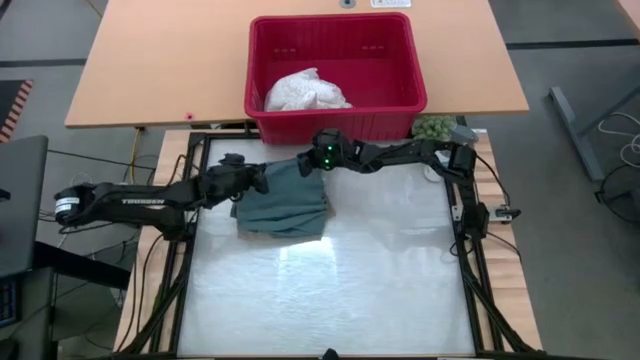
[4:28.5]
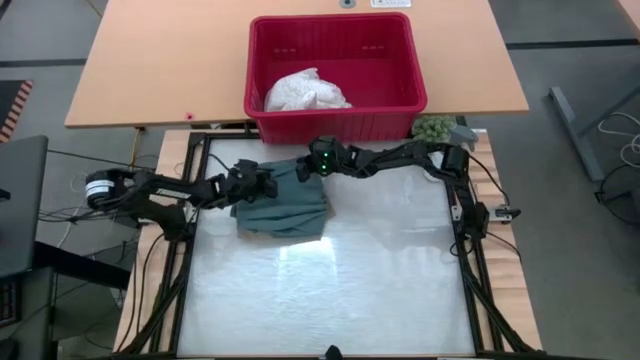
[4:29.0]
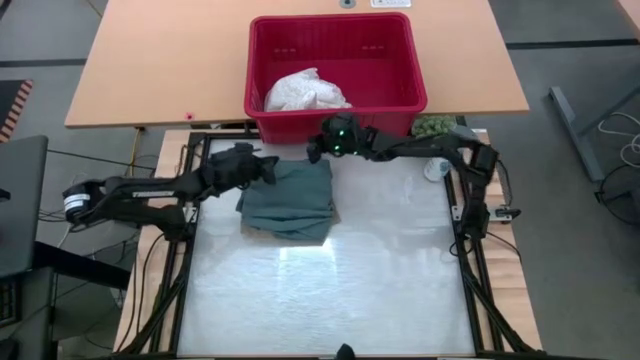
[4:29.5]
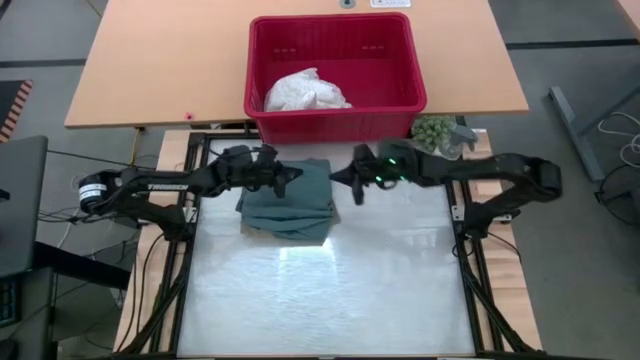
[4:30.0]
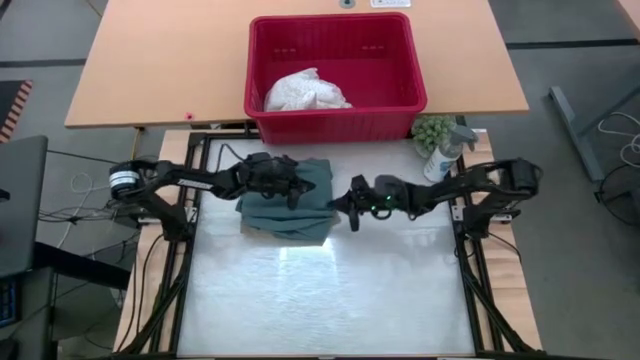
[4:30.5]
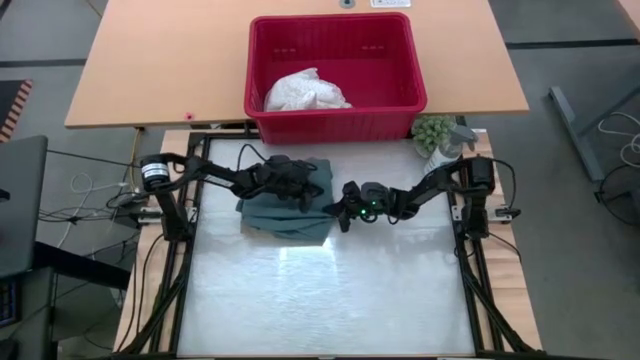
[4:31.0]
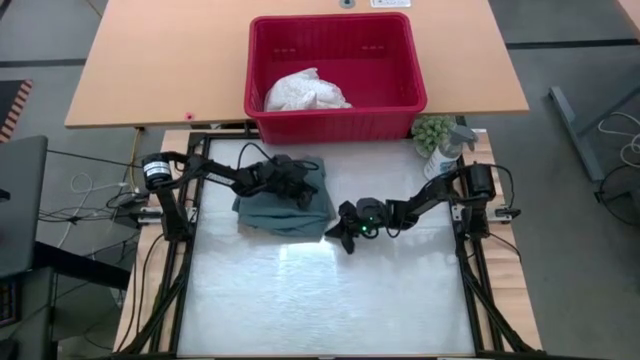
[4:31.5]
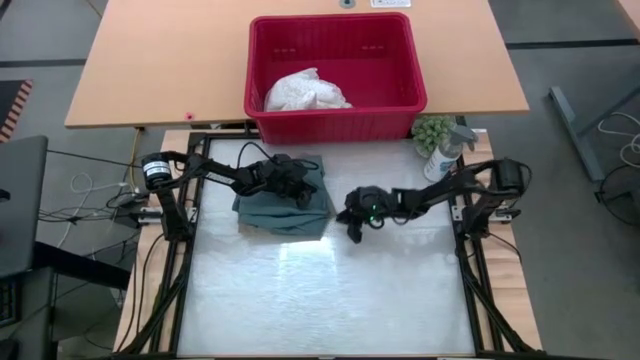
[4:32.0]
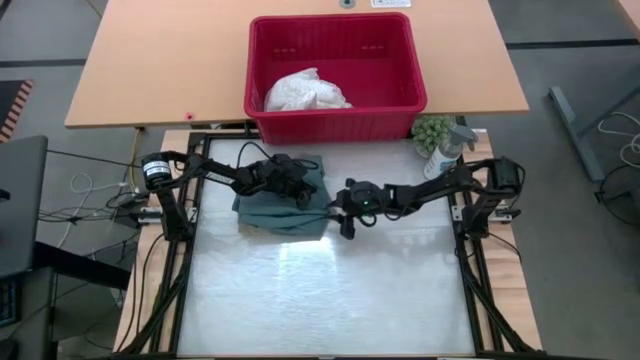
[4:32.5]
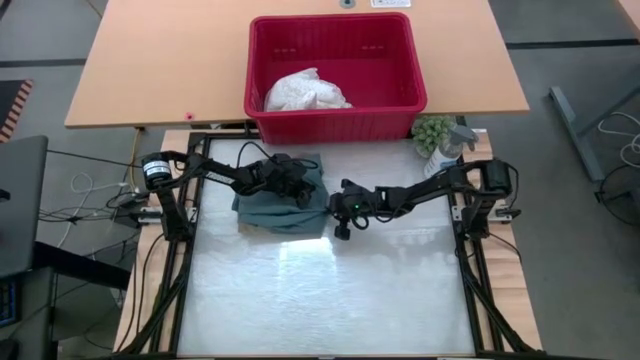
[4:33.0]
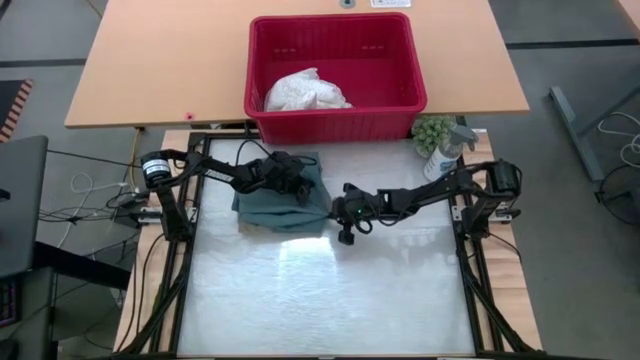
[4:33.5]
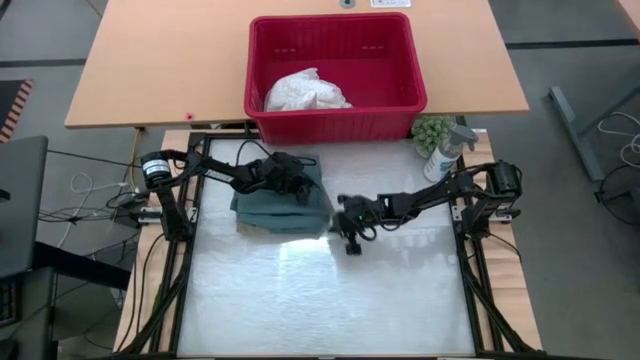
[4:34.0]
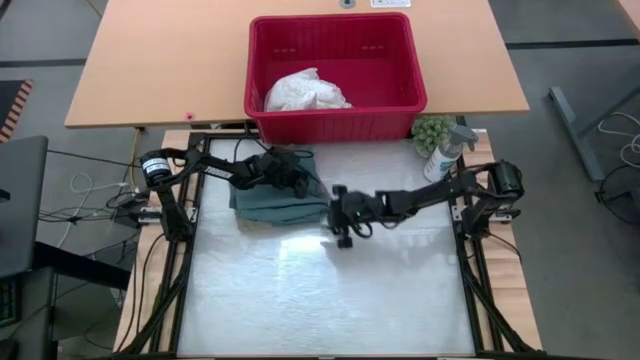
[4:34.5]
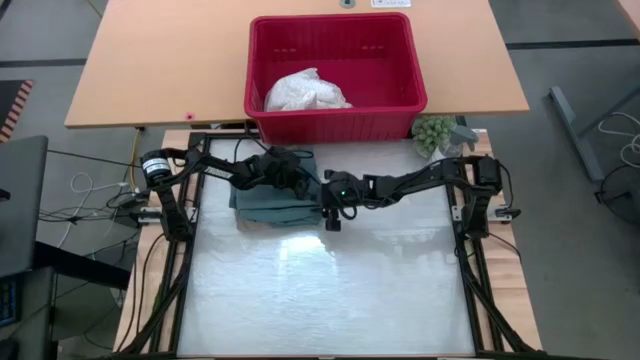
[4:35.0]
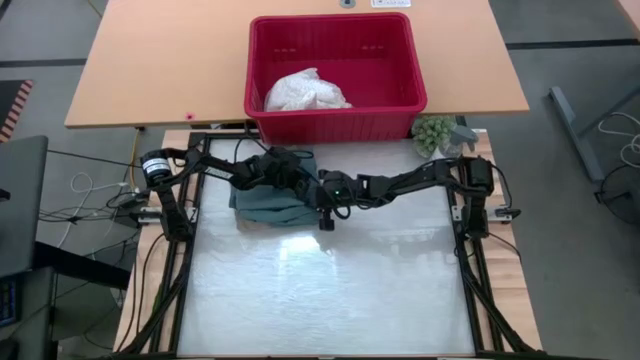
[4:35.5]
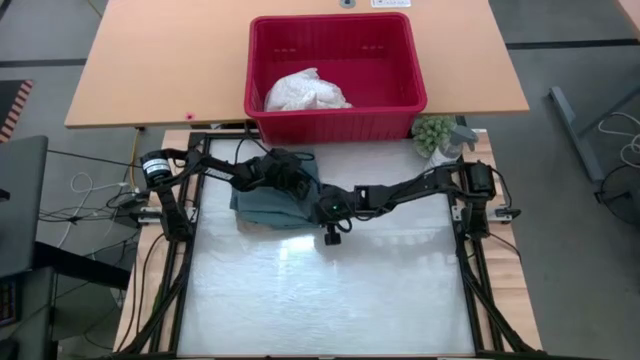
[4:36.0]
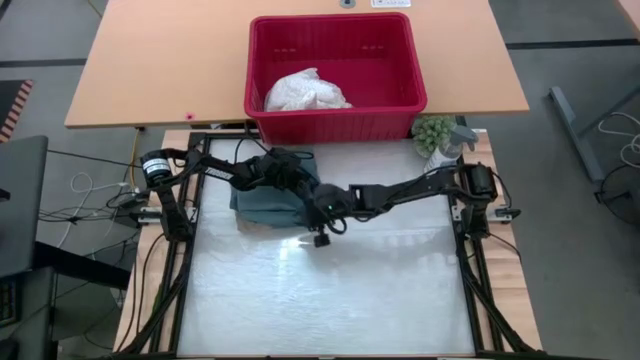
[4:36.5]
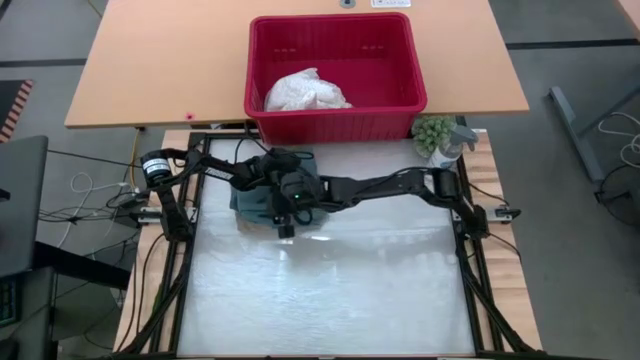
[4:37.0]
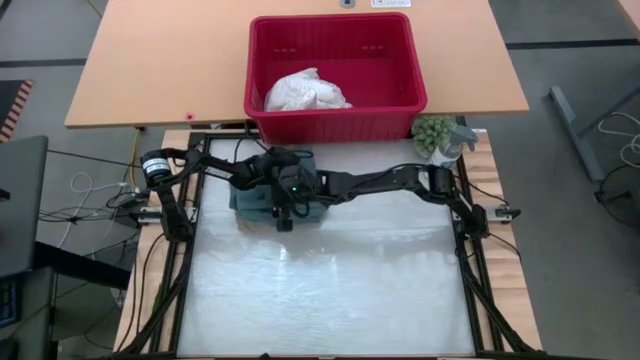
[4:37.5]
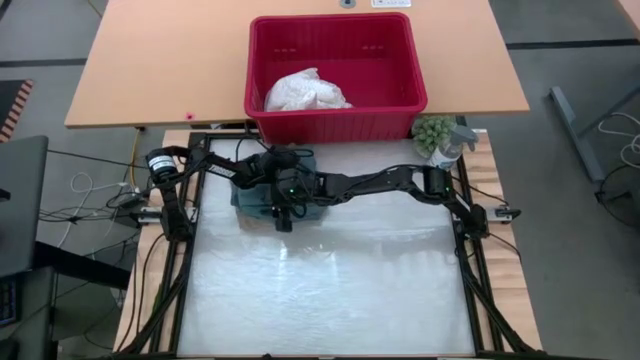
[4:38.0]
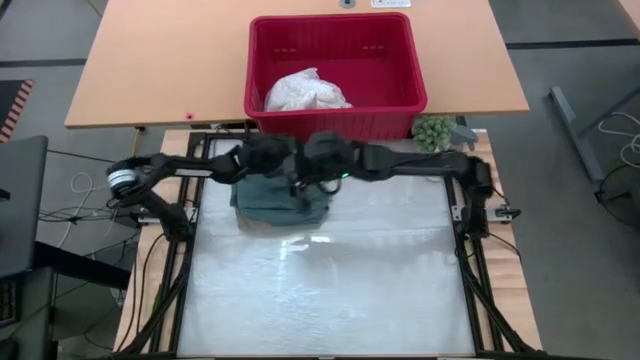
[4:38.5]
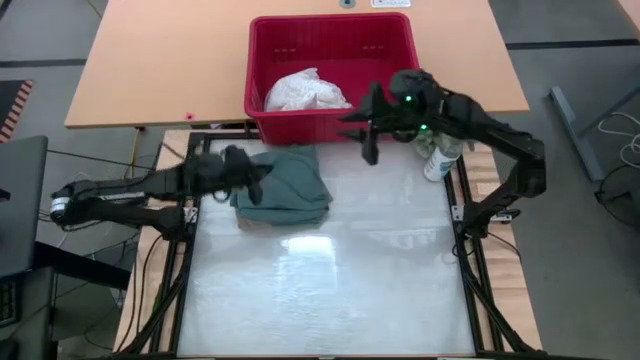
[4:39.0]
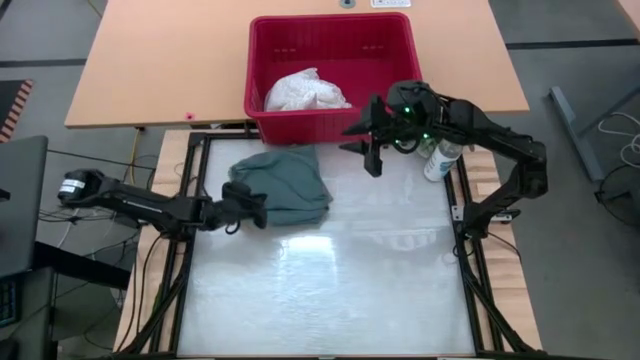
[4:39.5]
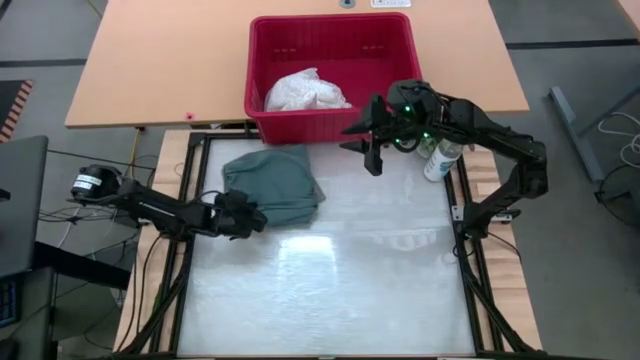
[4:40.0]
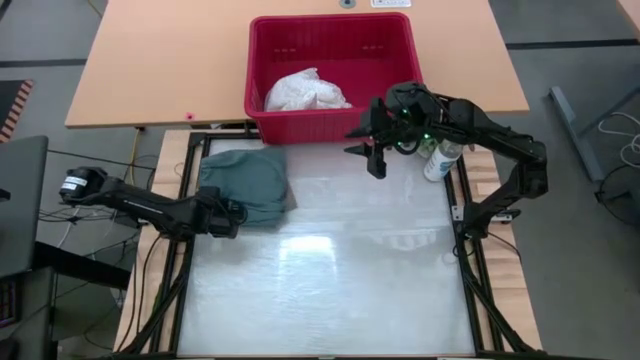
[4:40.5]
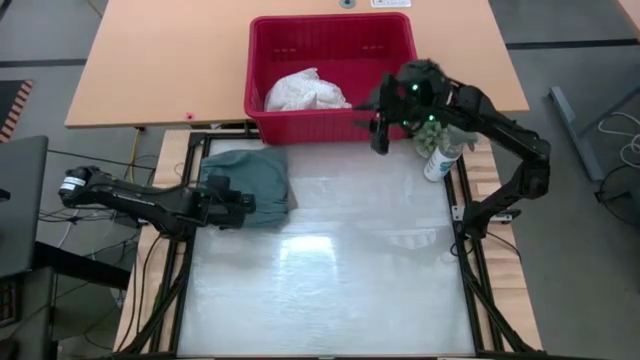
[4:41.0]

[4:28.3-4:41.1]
Task: Fold Laundry from Bin
Stack the folded blue pants on top of the folded brown short pants

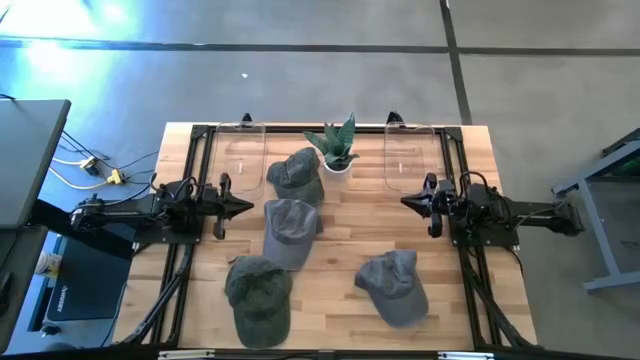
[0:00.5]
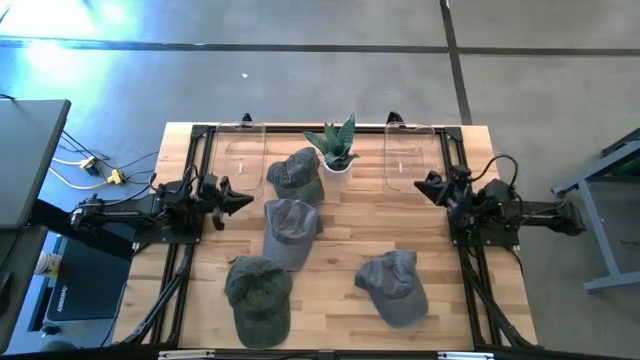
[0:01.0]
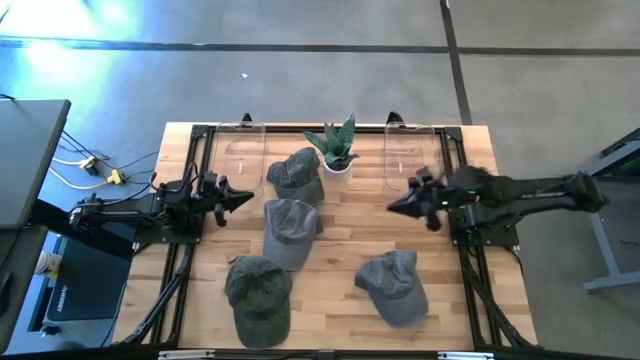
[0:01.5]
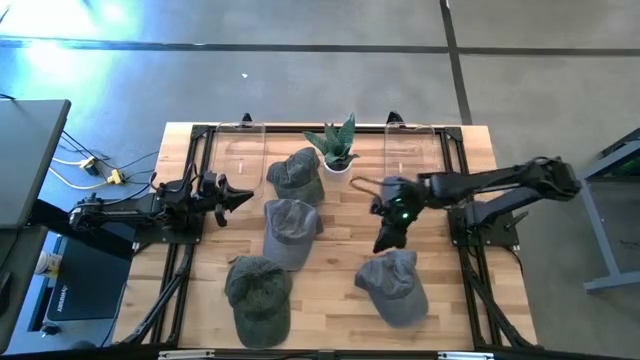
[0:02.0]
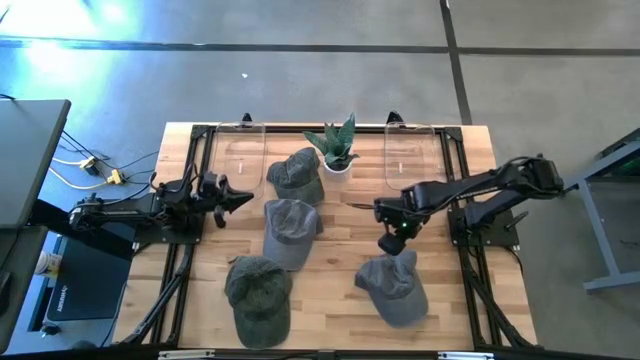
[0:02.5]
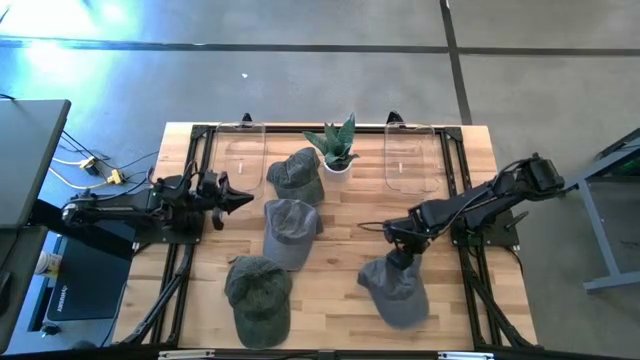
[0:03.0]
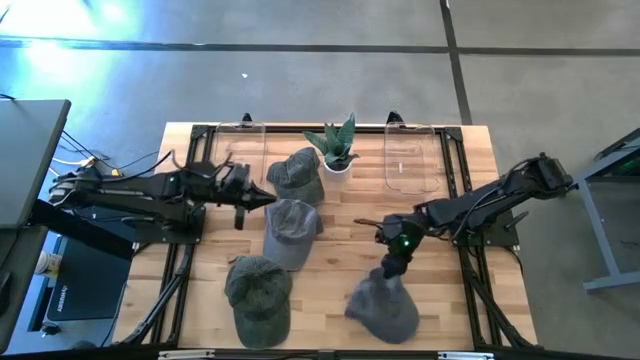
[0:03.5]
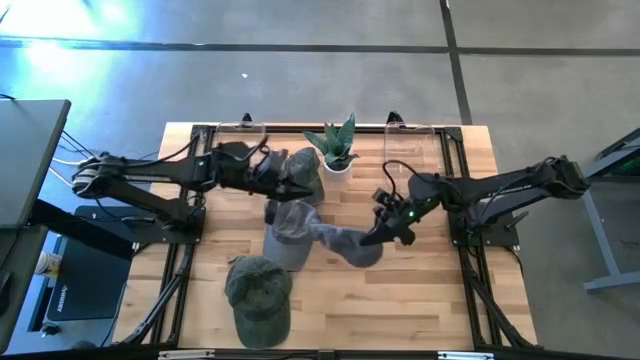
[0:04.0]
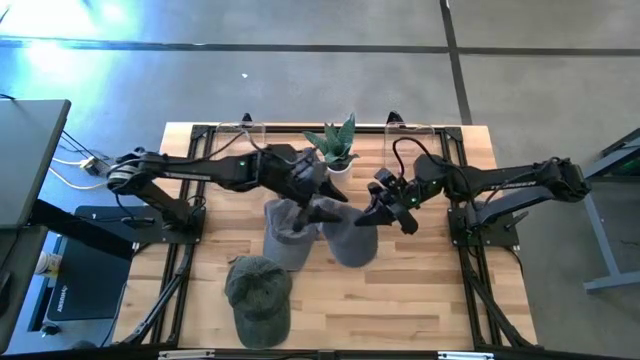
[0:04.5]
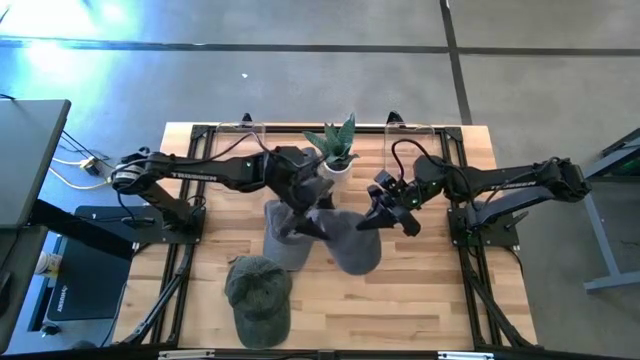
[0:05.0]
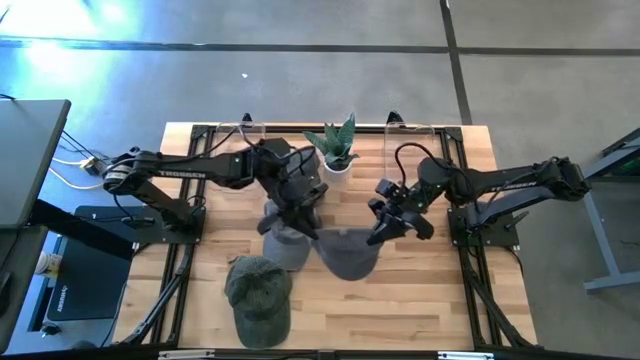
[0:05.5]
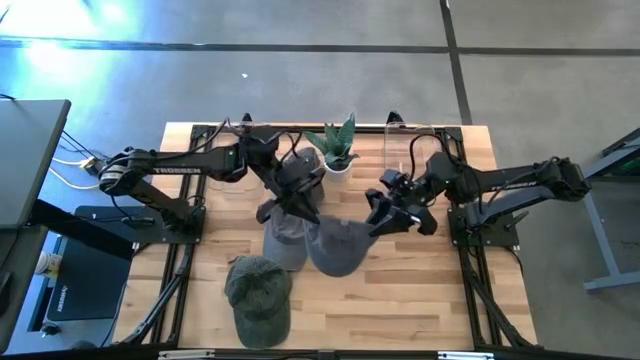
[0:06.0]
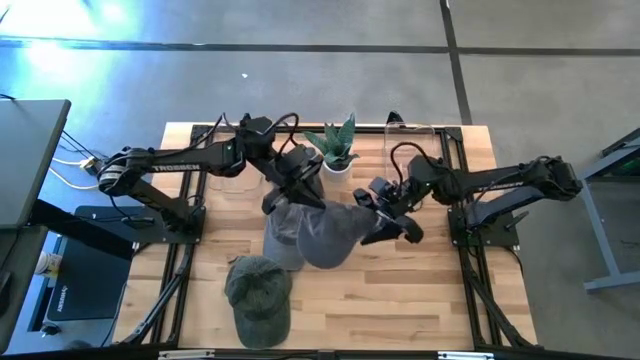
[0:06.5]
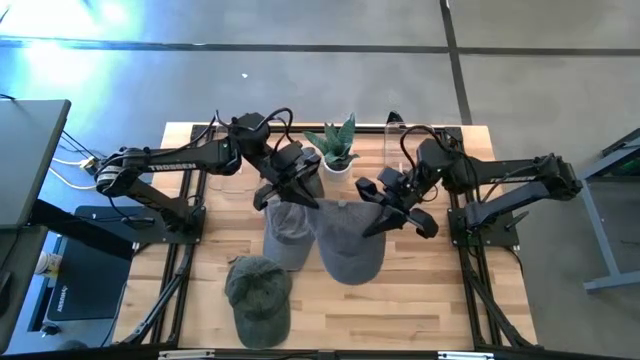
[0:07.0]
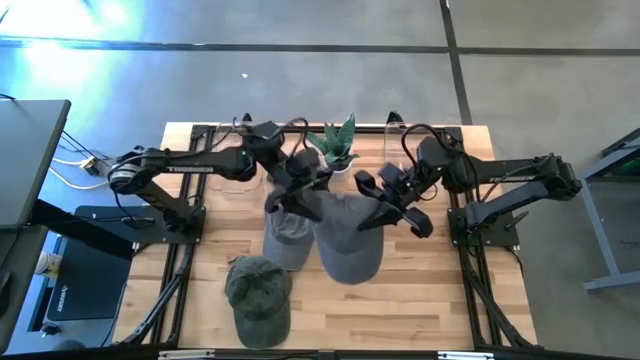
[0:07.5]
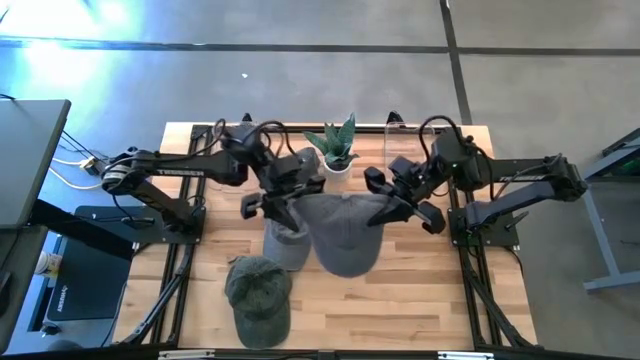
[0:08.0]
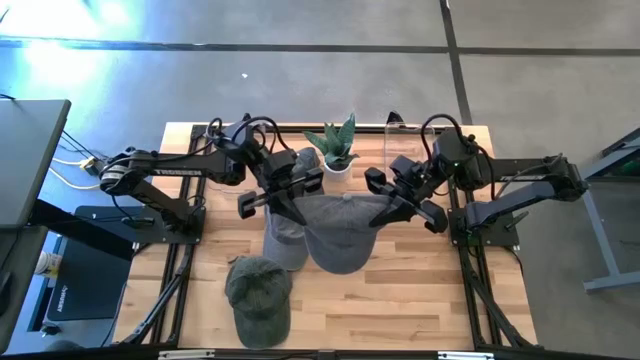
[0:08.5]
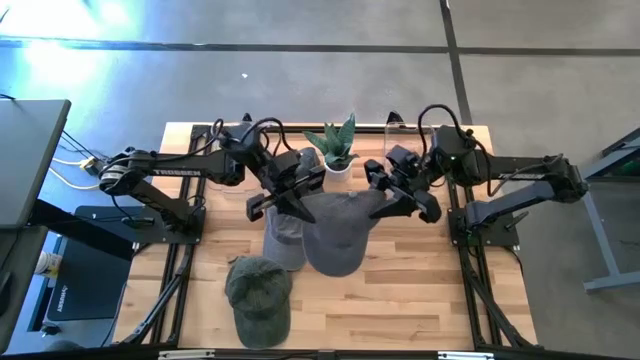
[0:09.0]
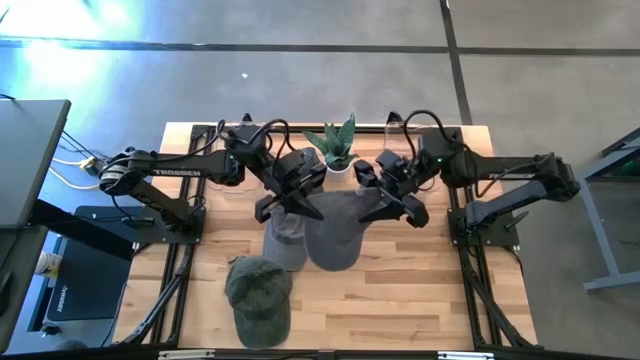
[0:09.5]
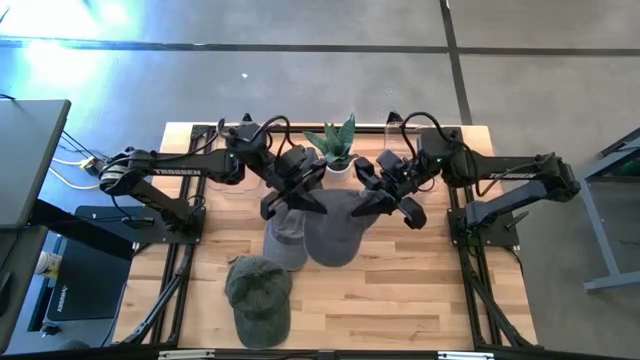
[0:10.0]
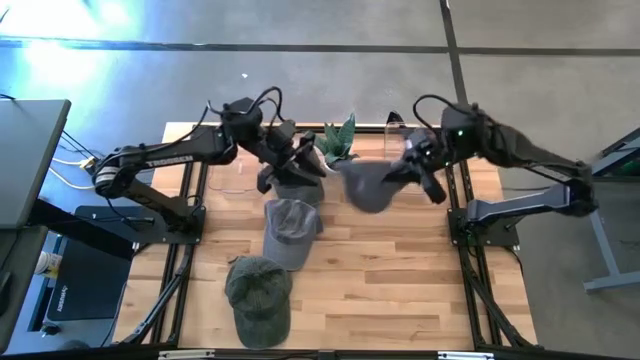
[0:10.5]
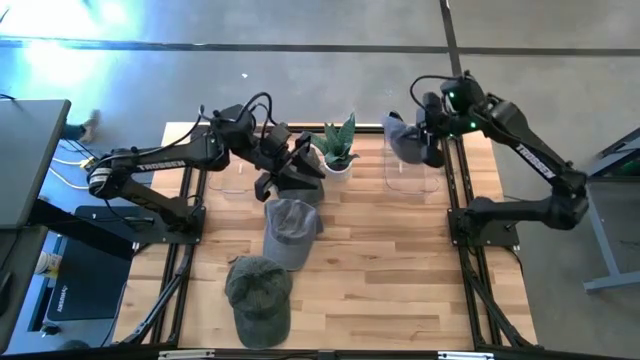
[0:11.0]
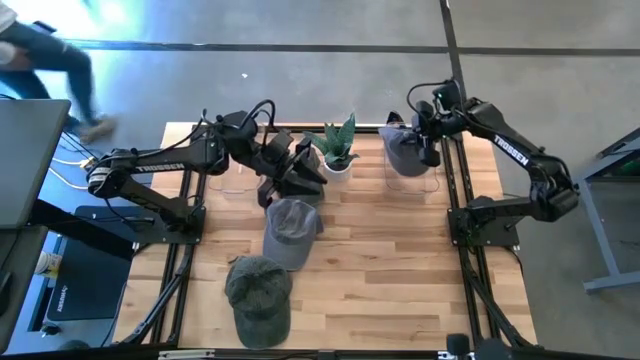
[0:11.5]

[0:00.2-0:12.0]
Task: Pick & Place hat
Put the bottom right gray cap into the right bin
